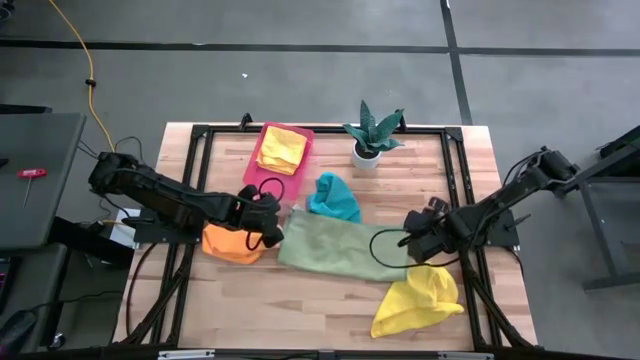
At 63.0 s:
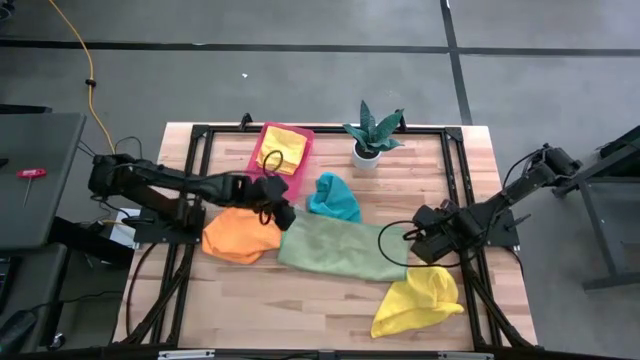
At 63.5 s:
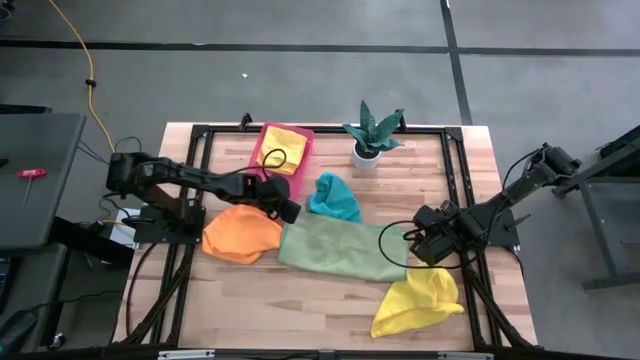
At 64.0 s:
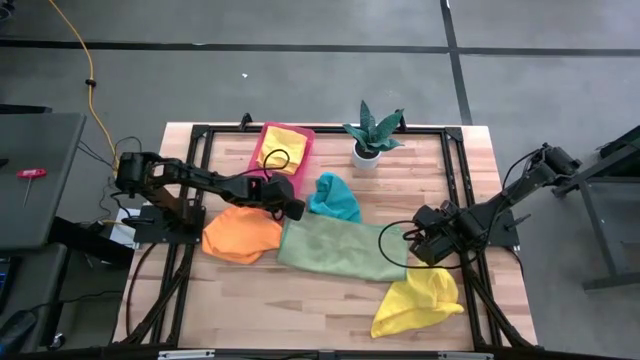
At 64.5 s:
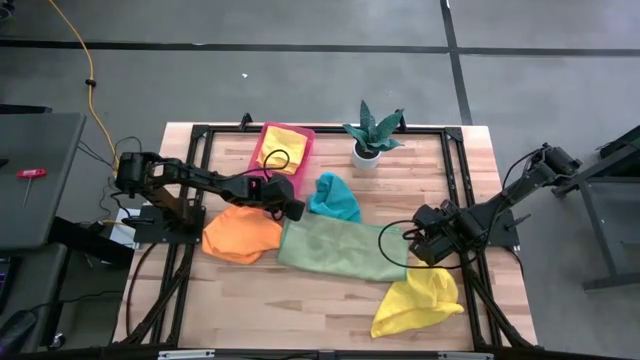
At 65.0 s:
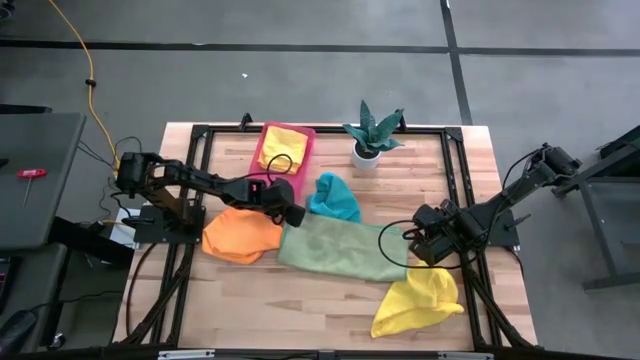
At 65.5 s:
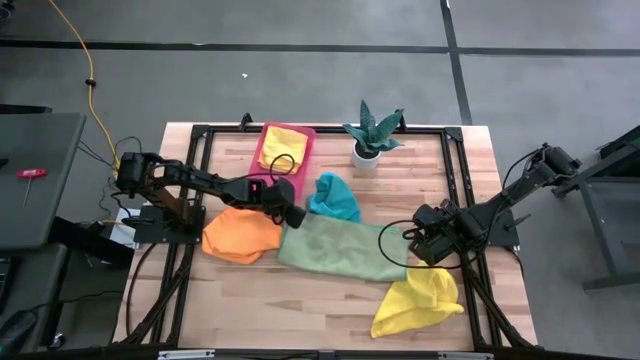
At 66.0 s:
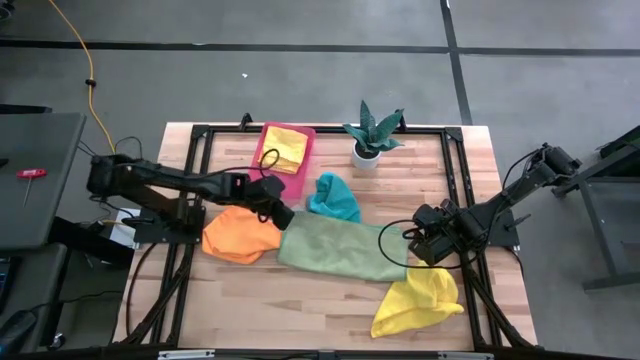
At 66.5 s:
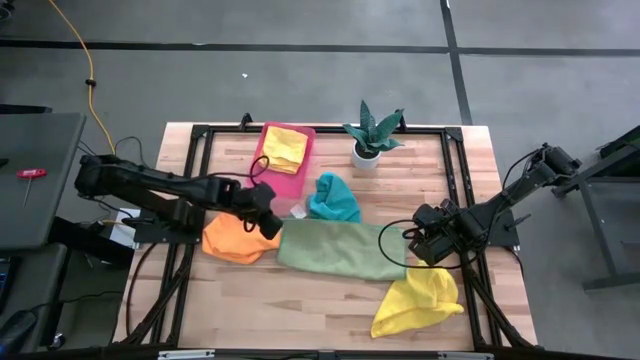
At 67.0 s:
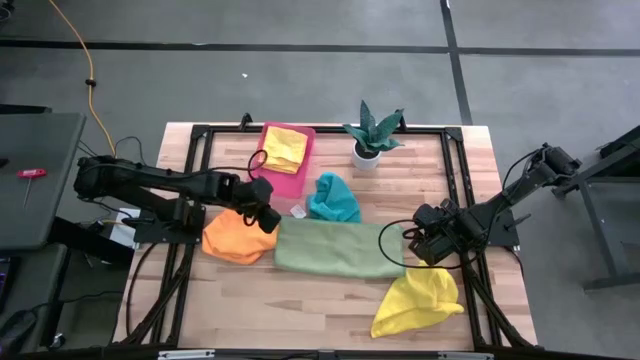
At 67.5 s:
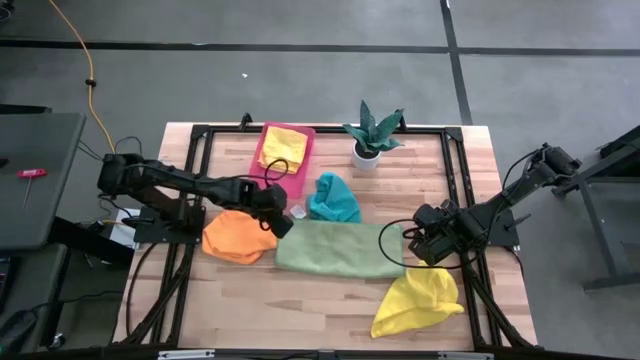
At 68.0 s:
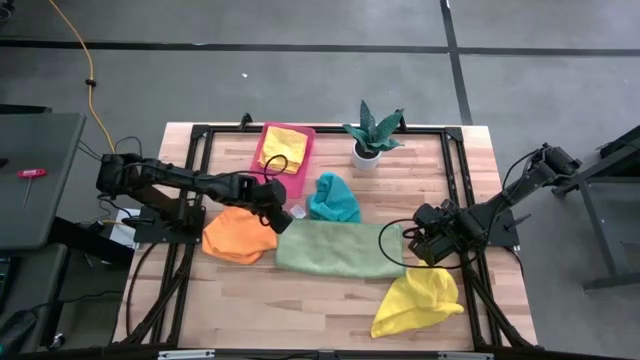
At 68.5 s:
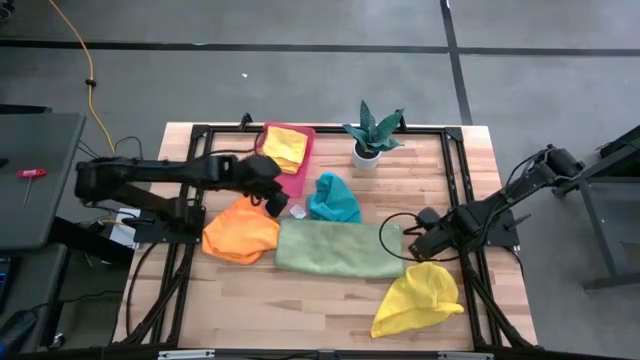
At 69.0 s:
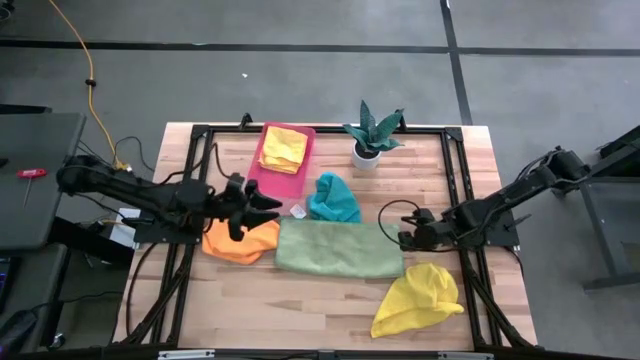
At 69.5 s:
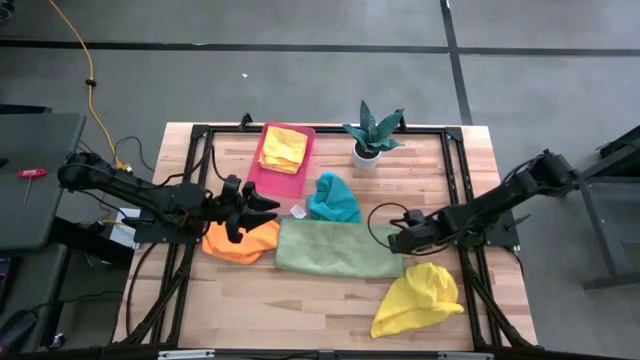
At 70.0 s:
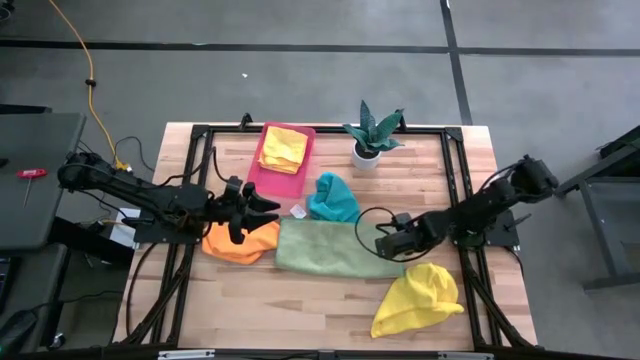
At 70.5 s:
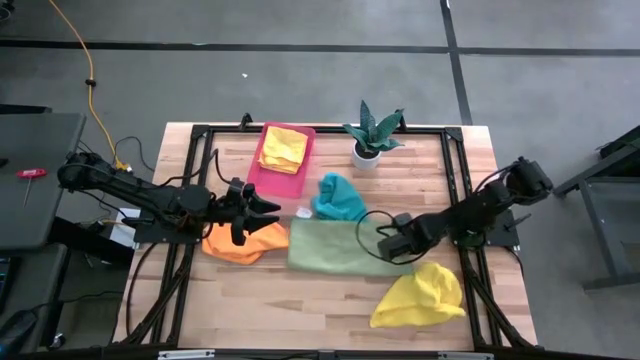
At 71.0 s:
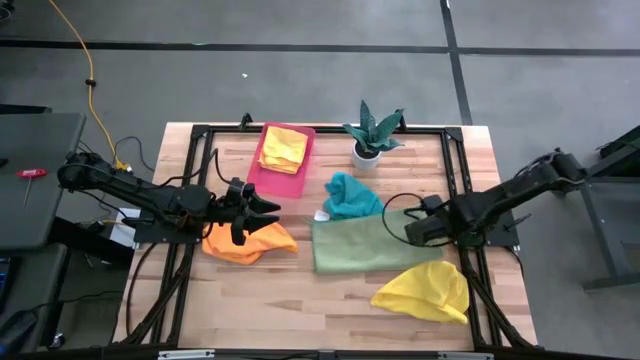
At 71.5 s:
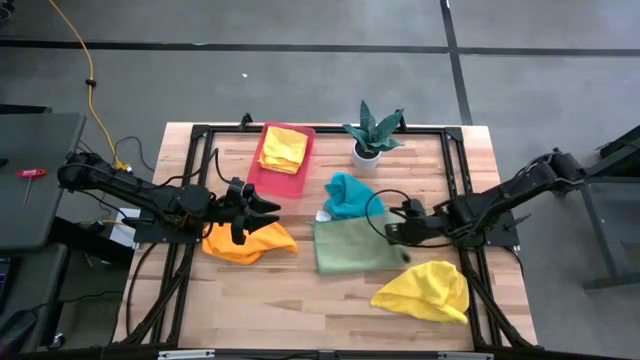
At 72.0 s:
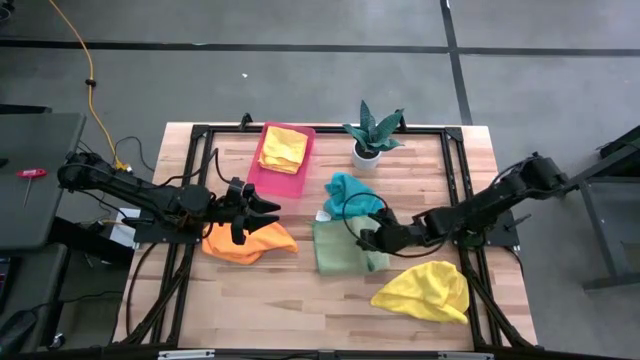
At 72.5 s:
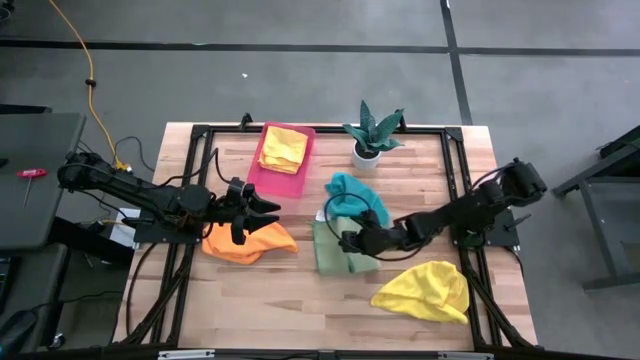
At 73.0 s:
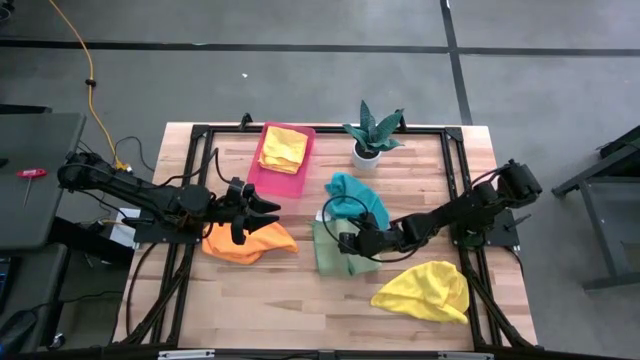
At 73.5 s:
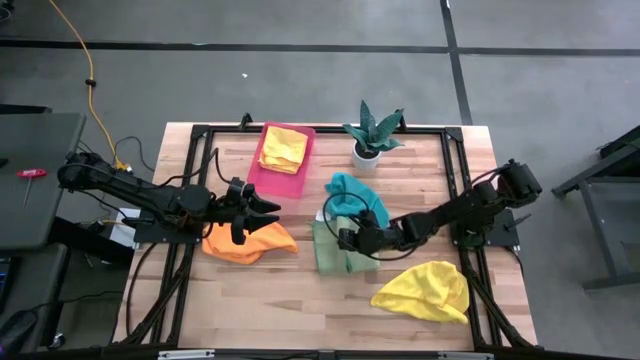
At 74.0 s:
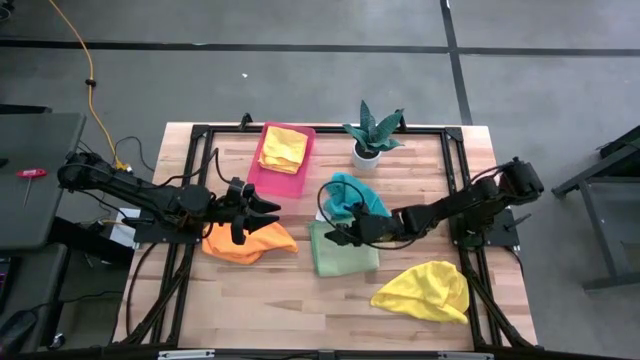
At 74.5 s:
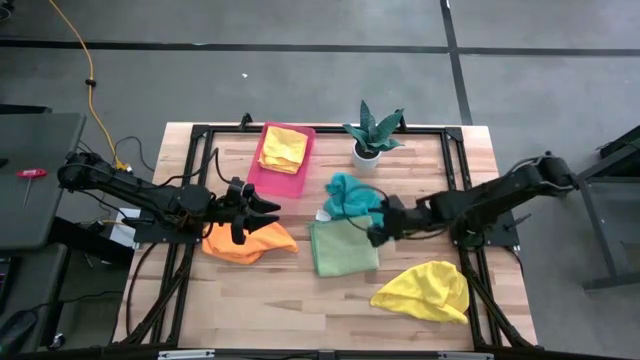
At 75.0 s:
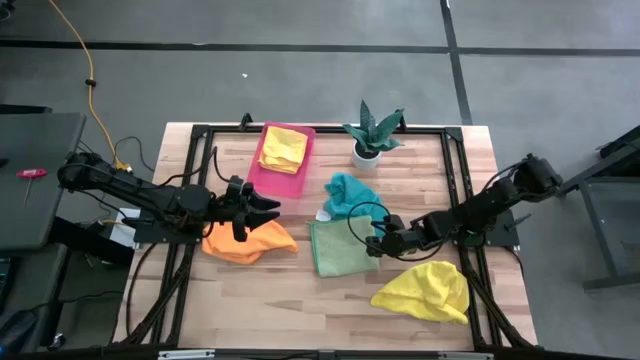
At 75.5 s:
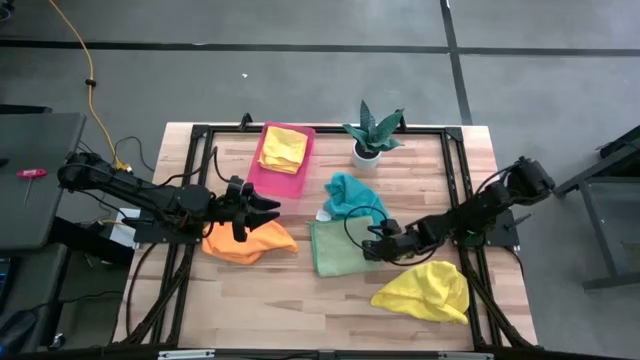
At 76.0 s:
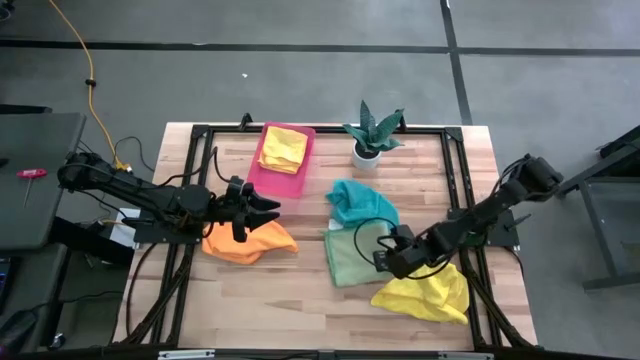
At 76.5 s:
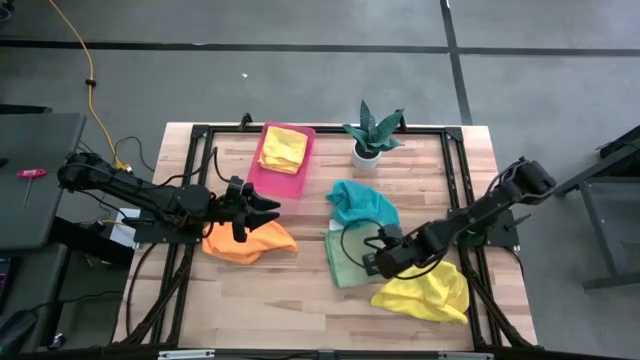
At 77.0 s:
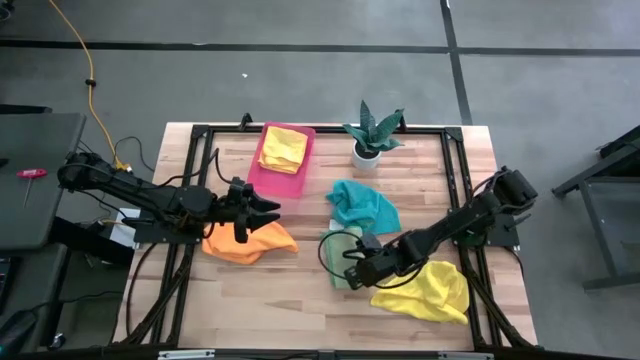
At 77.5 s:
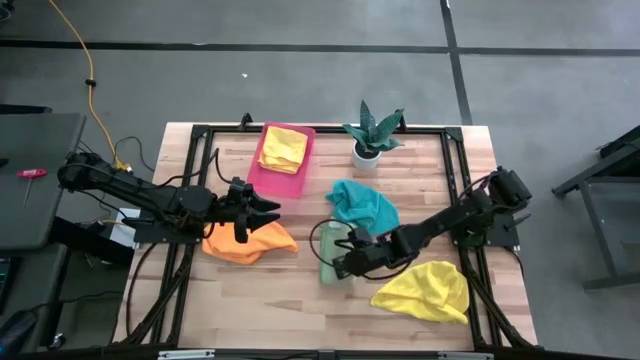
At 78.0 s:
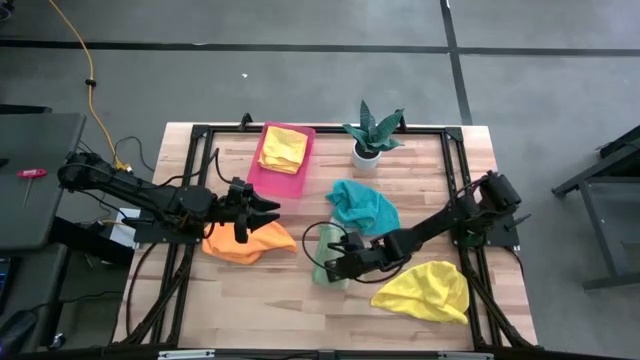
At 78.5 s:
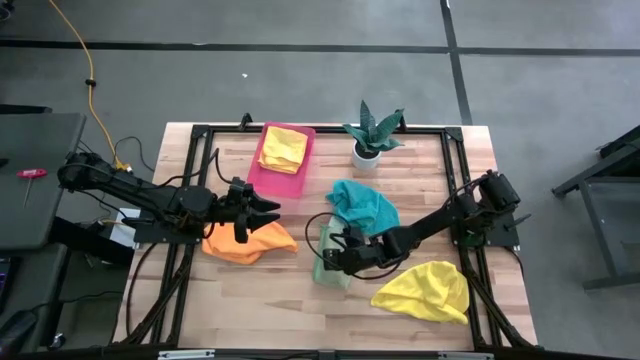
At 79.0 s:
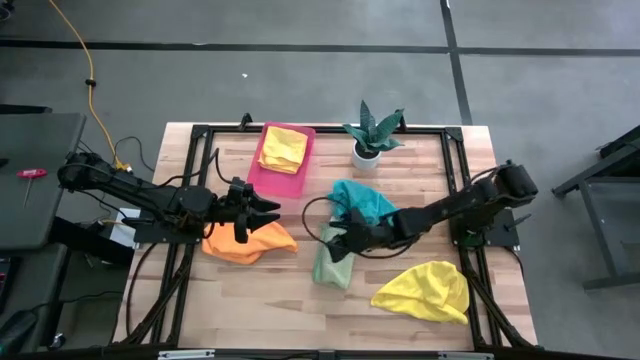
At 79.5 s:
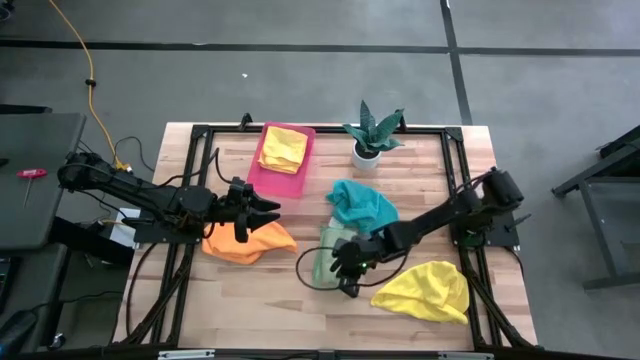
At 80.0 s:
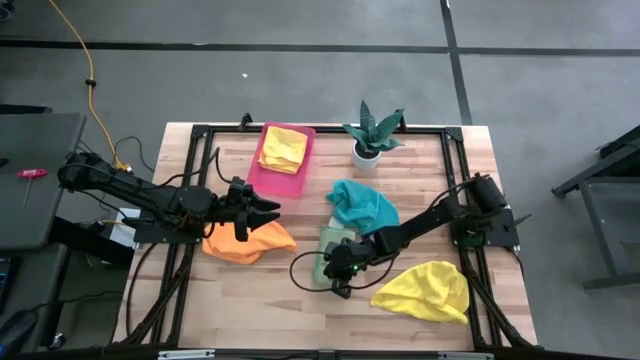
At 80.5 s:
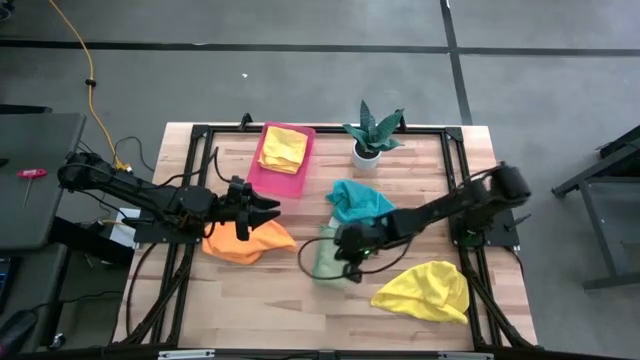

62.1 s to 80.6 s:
Task: Fold microfiber towels
Fold the green microfiber cloth

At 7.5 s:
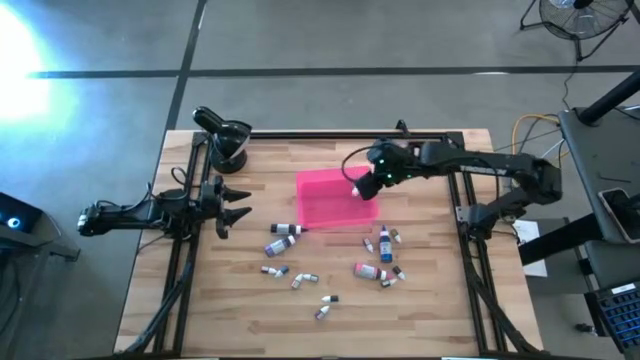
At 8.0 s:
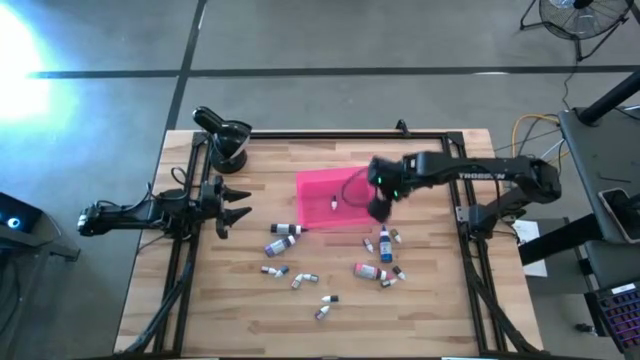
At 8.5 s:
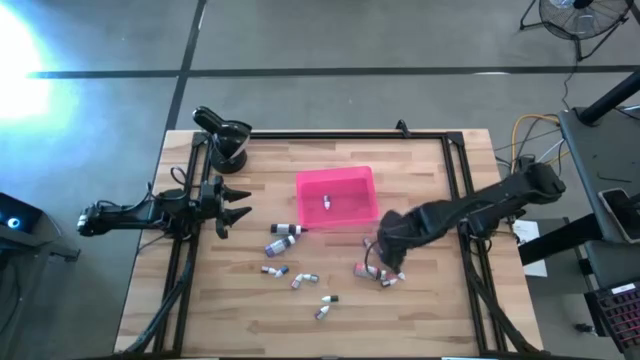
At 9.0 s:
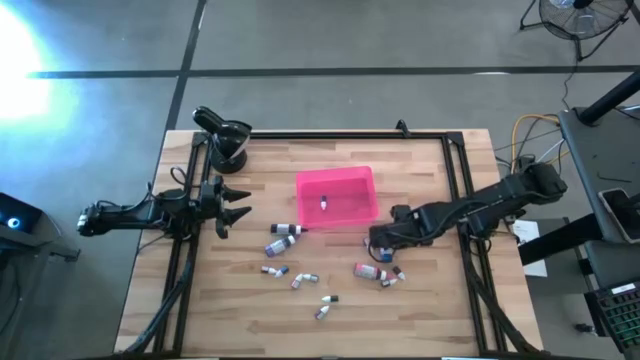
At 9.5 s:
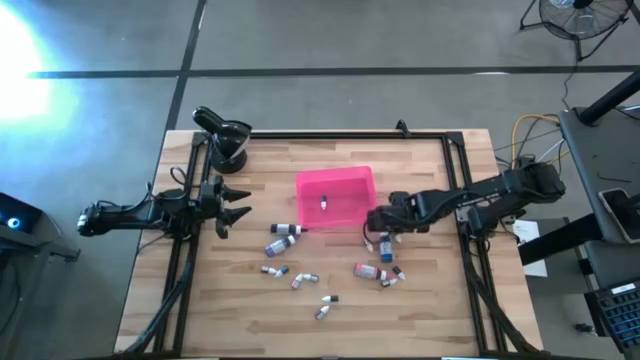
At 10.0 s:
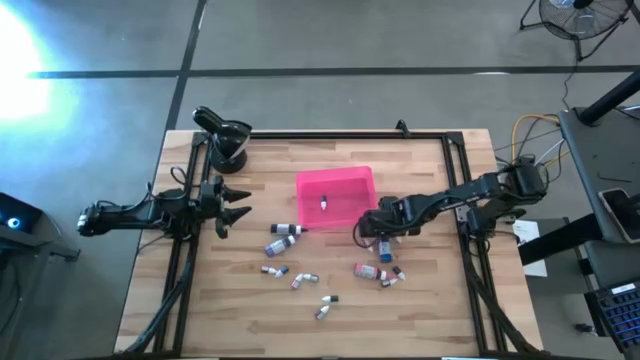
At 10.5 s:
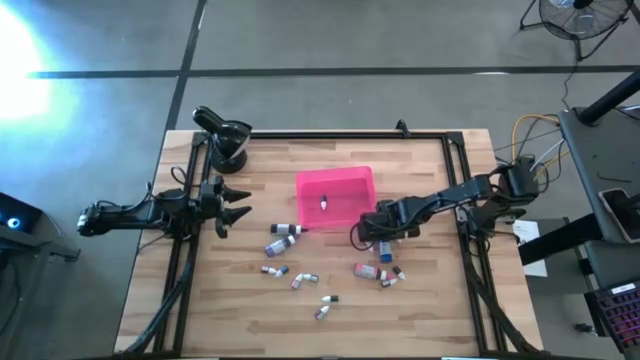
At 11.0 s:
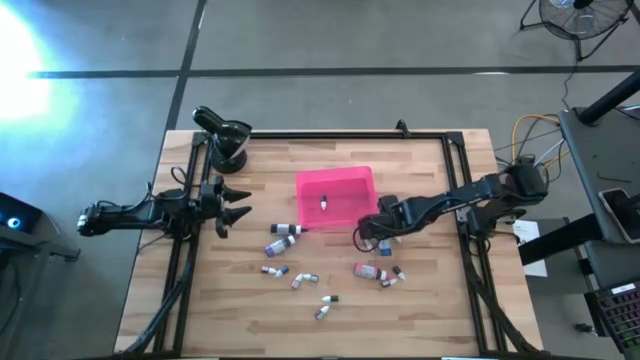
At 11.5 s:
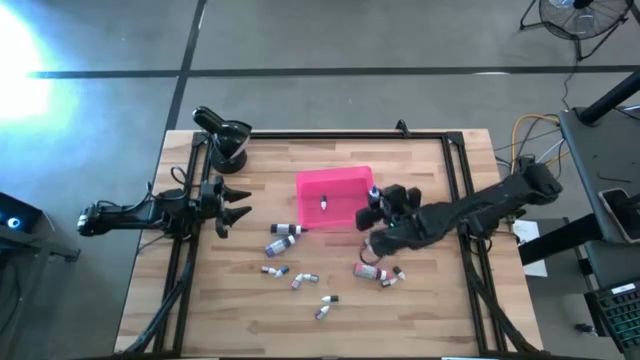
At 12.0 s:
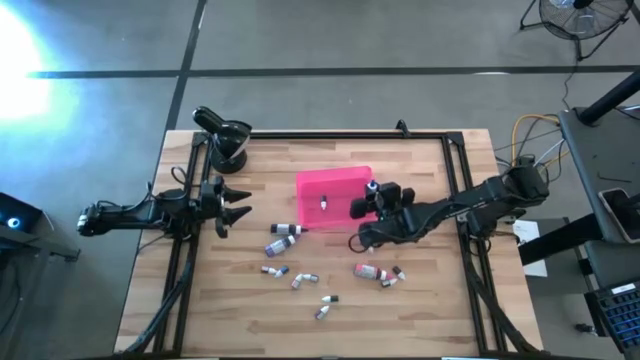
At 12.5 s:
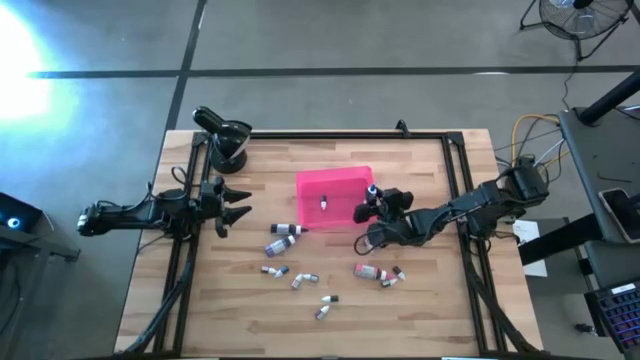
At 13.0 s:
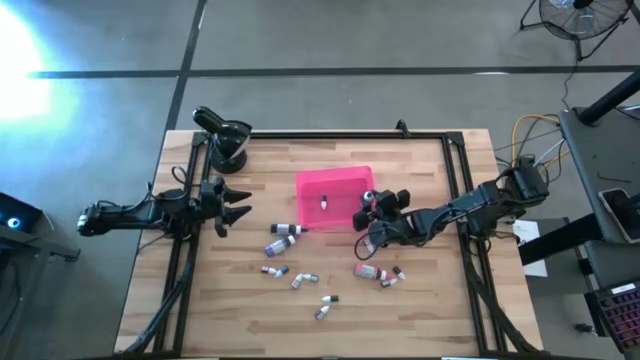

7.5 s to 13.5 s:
Task: Pick & Place food coloring
Put the large blue food coloring bottle into the pink bin
